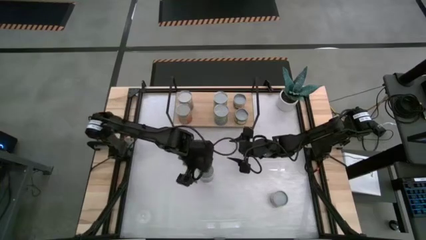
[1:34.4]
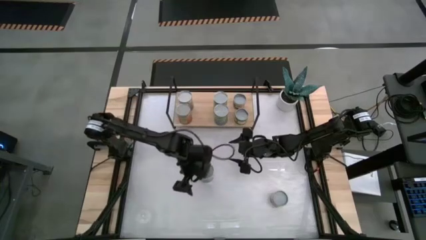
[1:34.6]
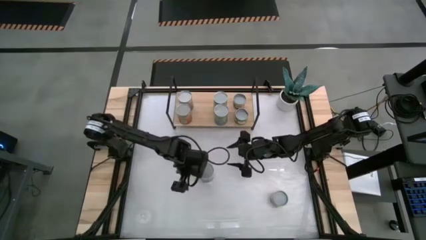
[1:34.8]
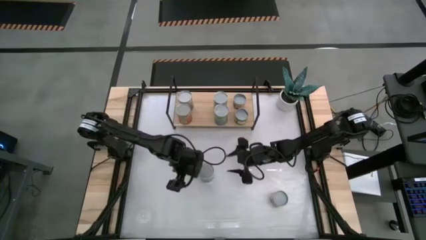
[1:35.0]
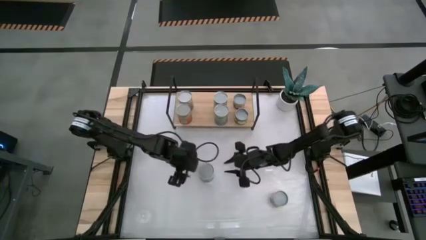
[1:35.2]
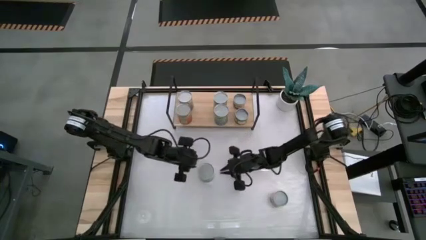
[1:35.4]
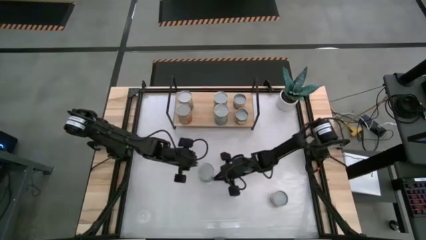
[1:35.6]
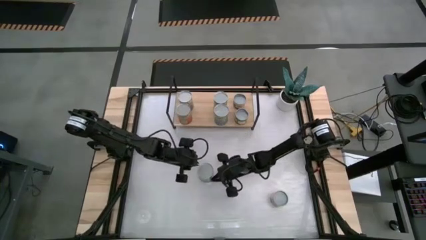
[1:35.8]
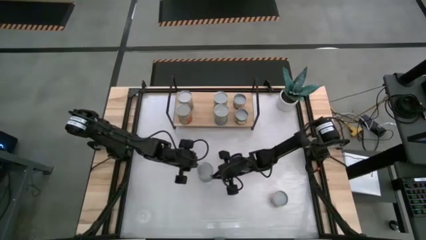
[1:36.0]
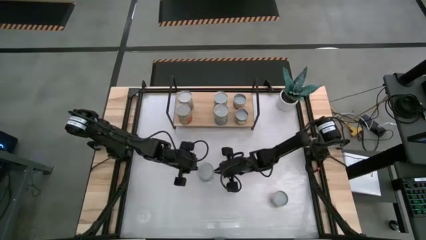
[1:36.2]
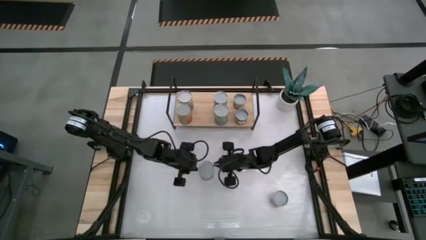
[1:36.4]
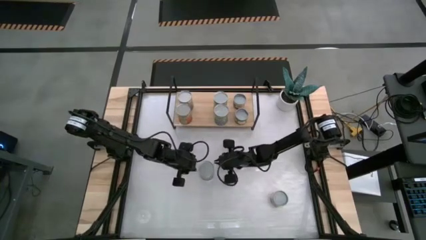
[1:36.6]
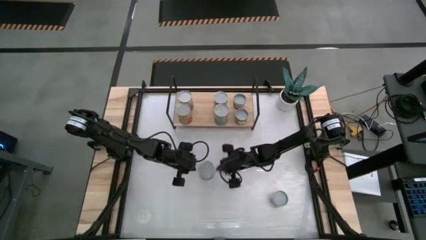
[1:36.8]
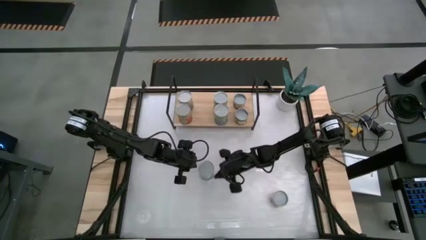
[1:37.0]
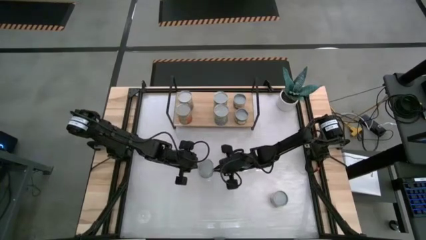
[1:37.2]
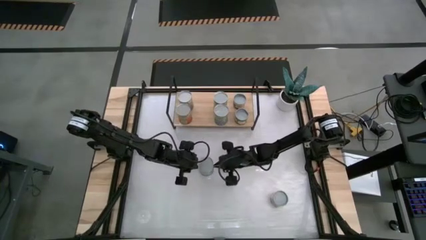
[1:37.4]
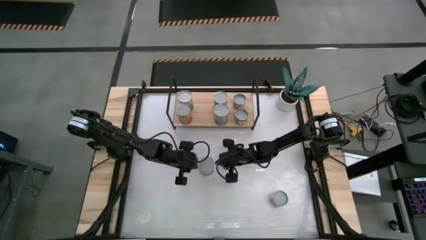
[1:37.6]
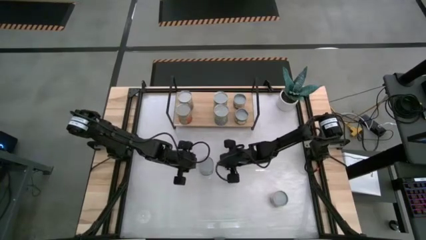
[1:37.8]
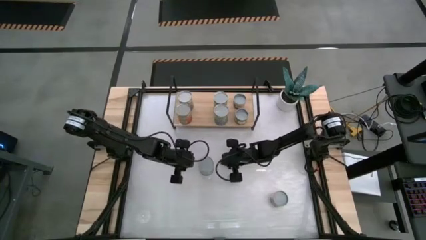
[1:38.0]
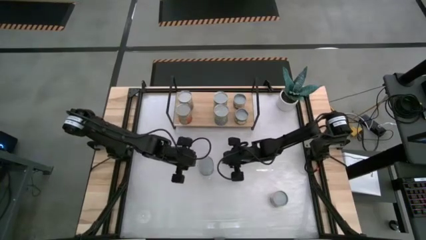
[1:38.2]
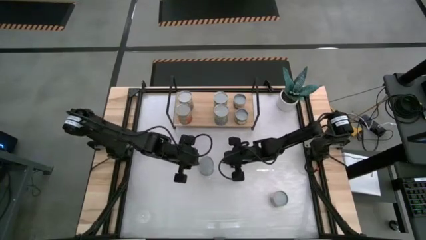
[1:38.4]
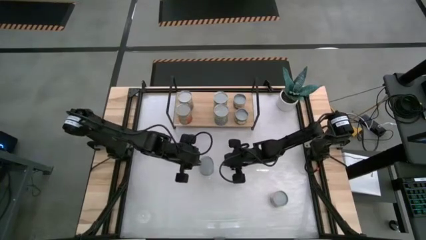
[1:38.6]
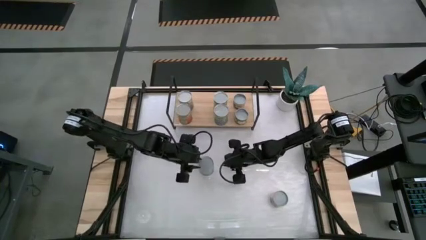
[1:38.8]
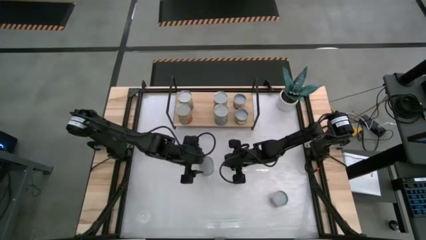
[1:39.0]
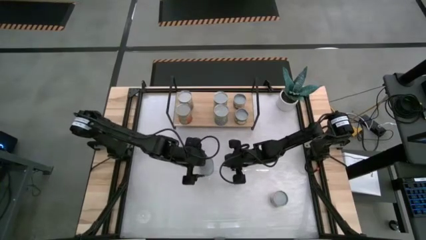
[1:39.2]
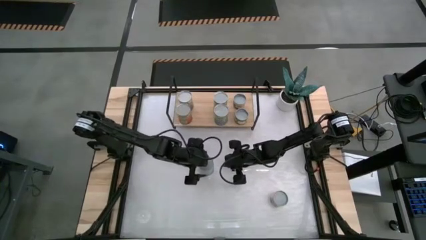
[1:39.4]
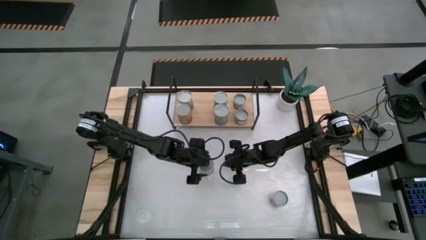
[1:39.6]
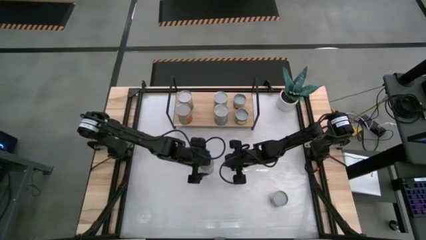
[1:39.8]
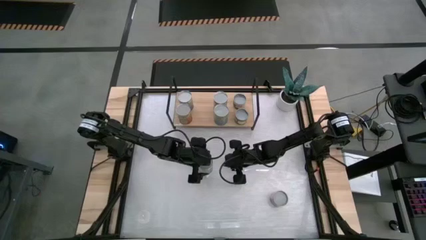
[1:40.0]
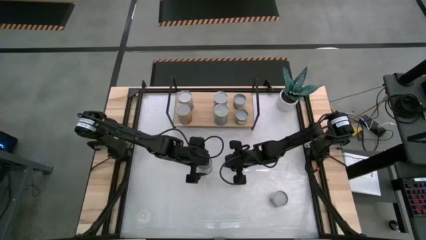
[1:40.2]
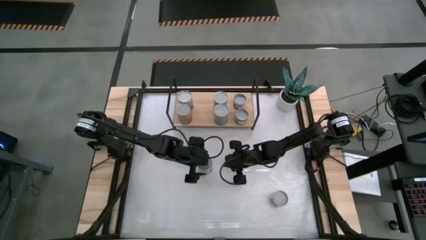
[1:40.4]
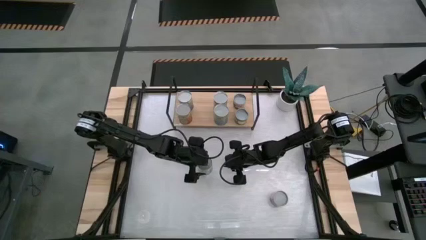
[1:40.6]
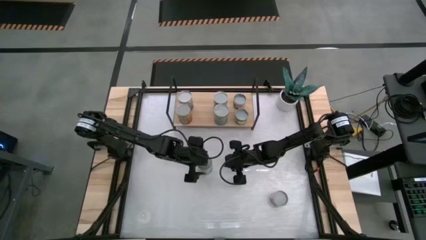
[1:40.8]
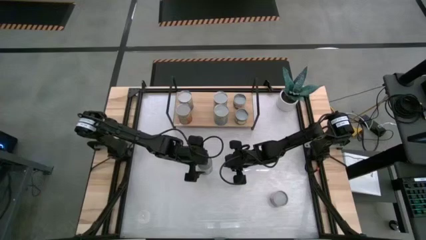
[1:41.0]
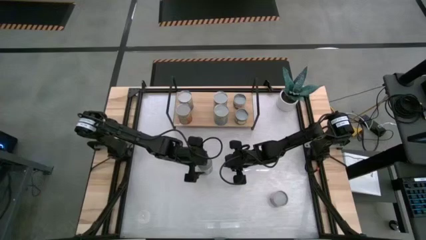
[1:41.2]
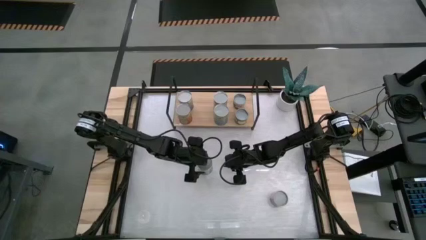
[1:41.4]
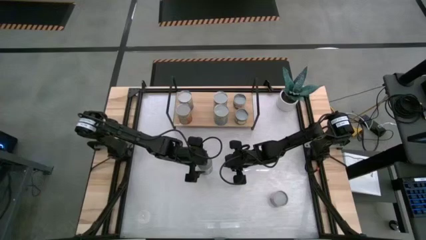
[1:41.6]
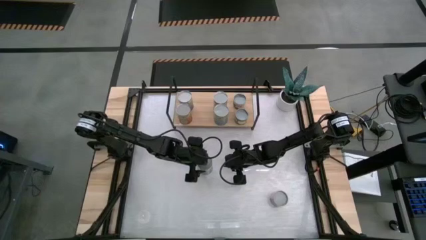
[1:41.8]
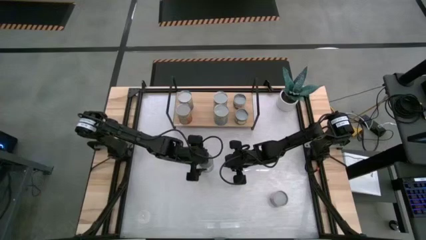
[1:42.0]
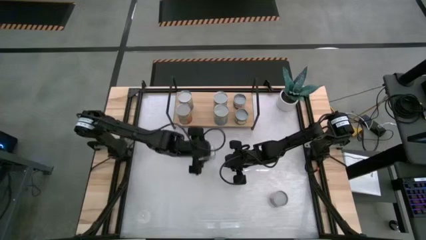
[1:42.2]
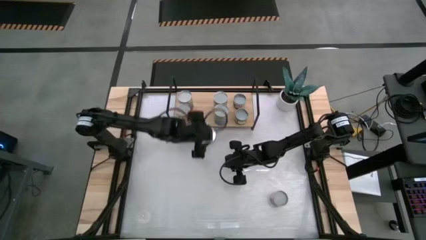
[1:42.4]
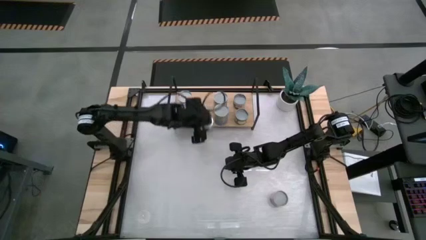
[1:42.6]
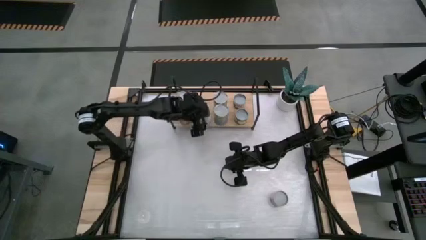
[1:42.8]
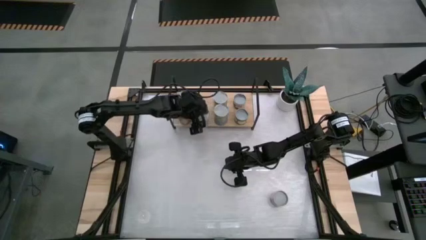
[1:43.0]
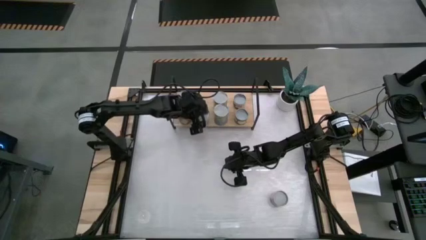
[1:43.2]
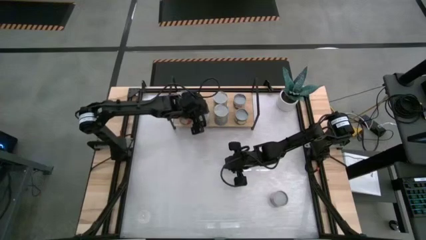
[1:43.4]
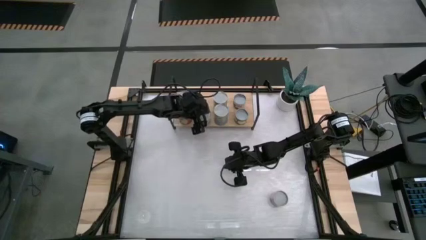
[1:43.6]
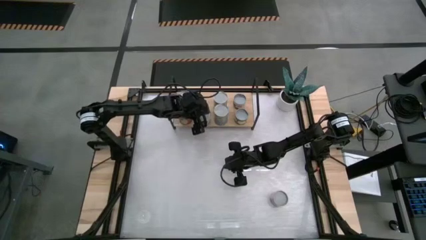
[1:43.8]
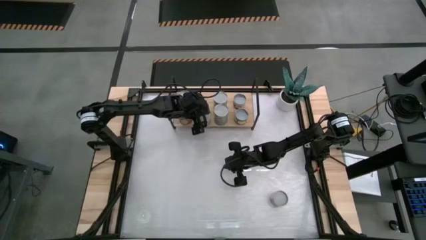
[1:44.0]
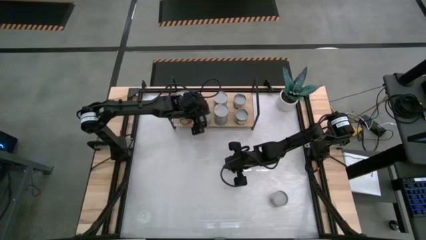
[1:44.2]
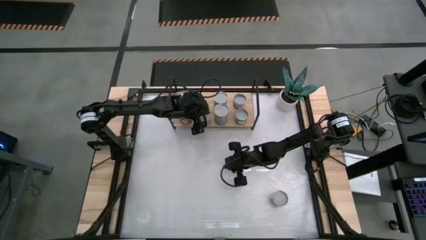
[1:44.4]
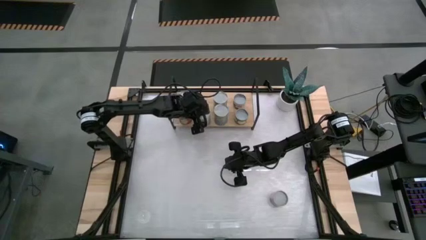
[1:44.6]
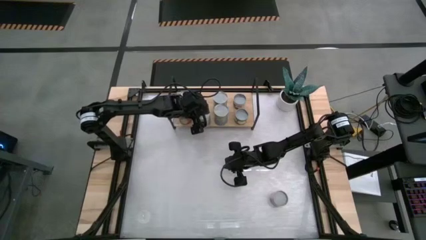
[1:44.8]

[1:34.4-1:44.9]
Task: Pick and place cans onto a shelf
Put the canned peas on the shelf

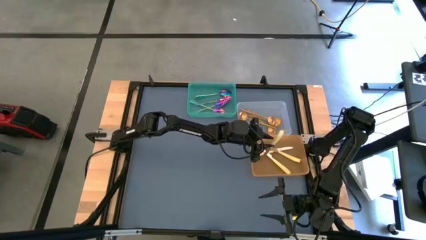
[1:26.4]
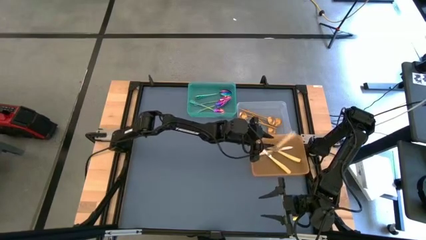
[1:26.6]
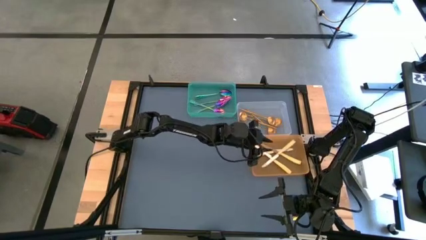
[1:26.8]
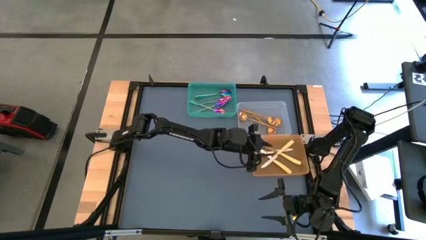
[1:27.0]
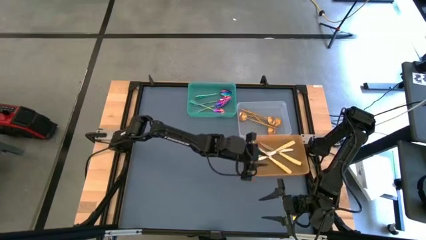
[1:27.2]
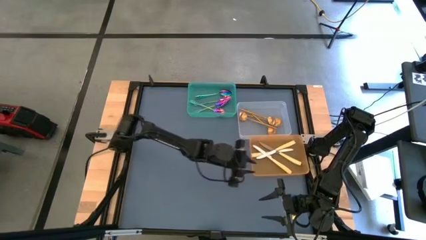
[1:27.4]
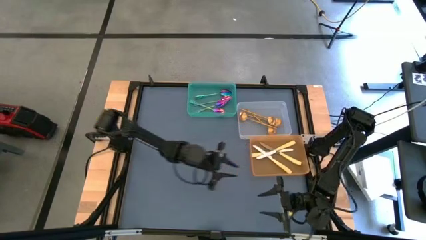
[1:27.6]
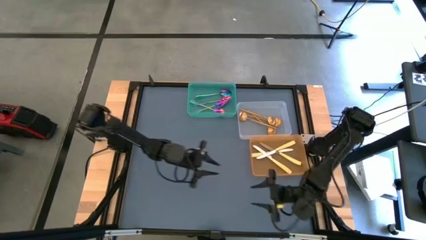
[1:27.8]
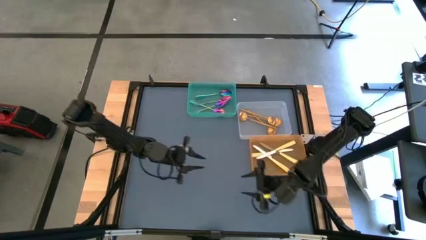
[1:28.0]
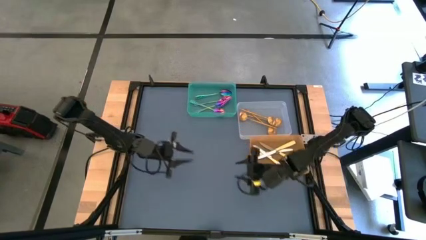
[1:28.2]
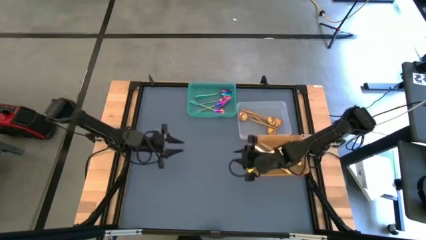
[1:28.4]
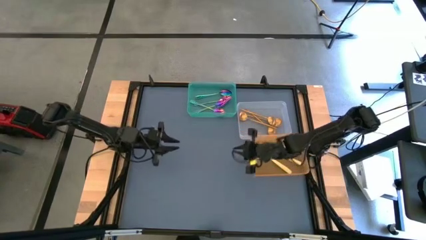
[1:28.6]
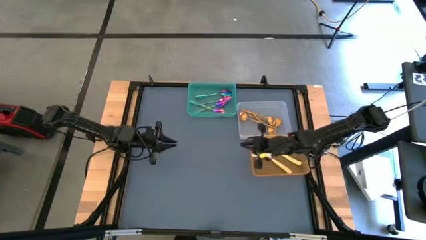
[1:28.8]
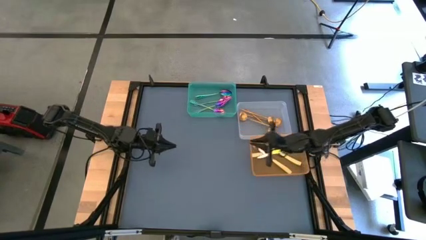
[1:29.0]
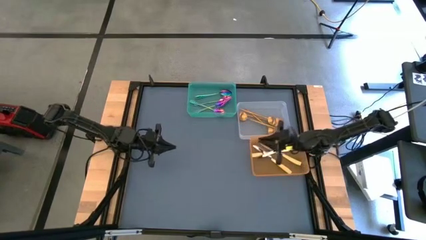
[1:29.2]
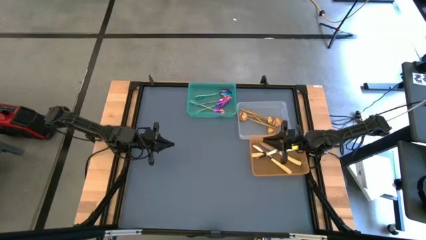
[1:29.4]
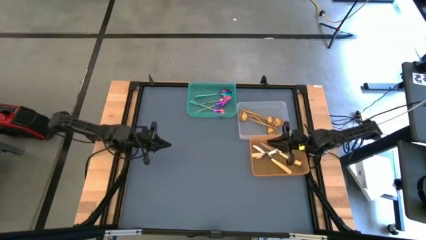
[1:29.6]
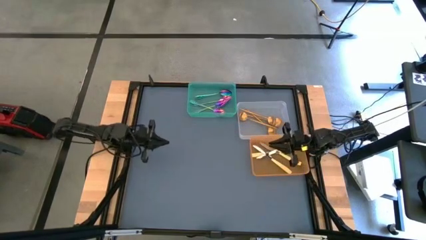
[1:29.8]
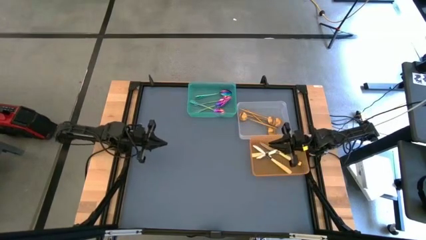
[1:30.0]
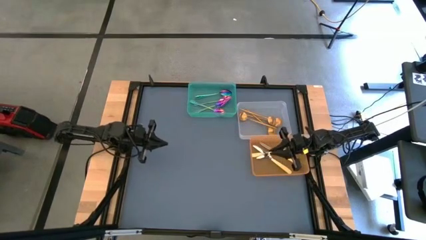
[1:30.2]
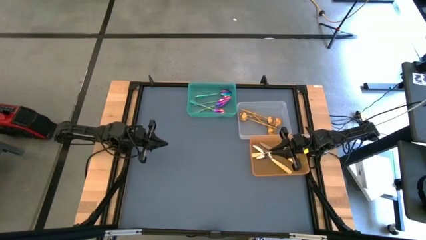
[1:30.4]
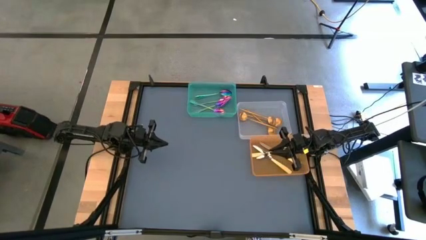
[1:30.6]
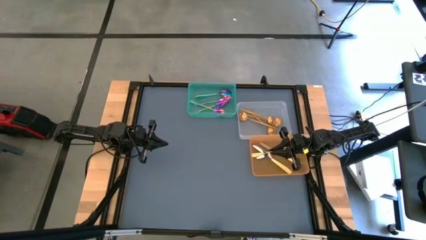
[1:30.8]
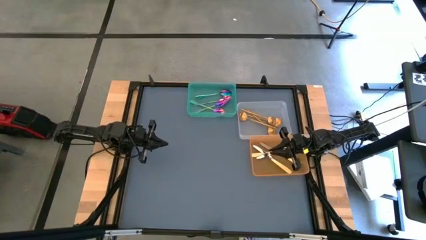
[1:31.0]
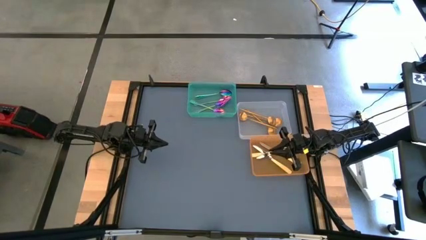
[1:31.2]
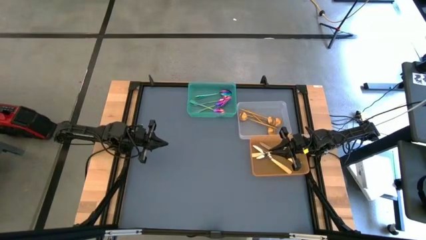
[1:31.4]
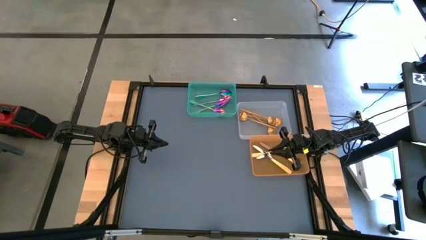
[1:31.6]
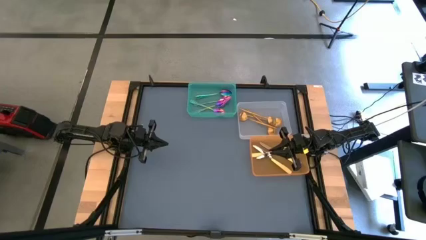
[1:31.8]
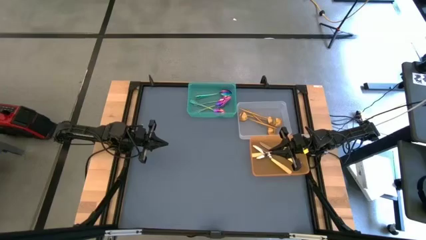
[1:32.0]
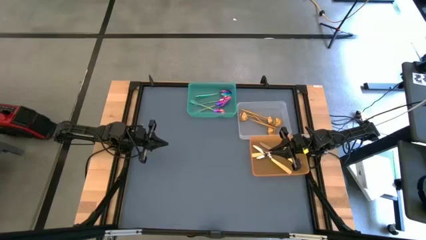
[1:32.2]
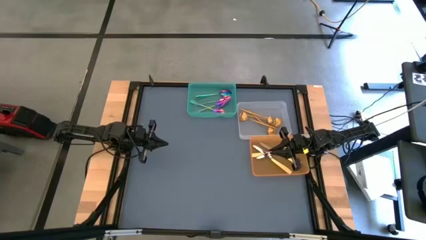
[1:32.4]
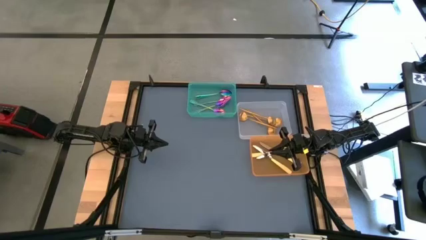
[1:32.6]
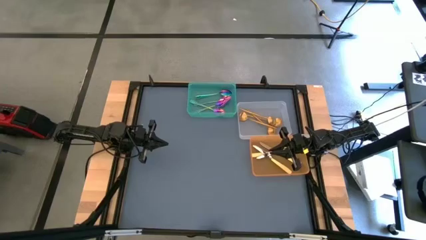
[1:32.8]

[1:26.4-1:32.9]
Task: Sort silverware by color (type)
Return to Home Position
